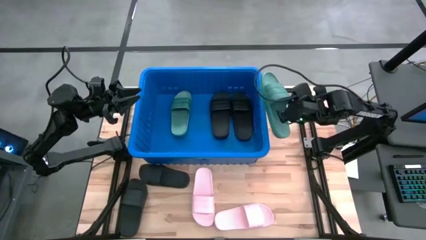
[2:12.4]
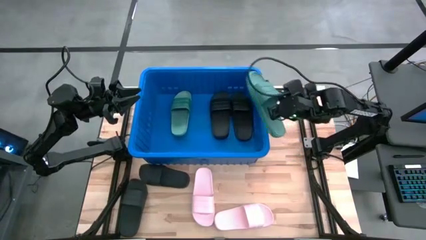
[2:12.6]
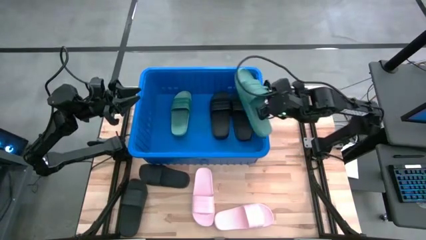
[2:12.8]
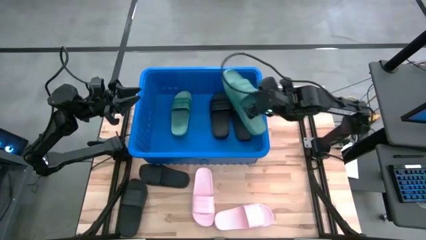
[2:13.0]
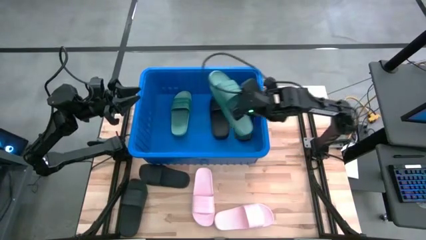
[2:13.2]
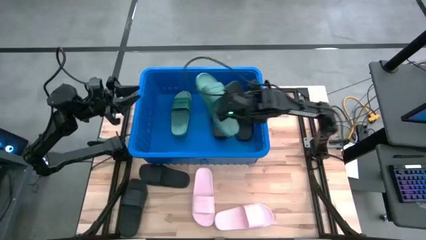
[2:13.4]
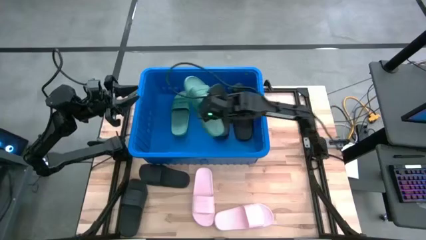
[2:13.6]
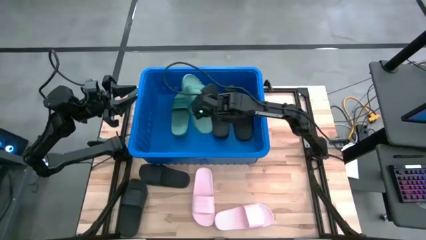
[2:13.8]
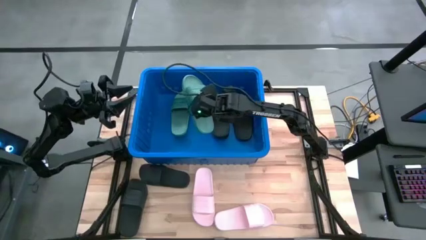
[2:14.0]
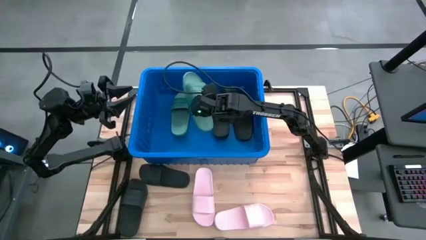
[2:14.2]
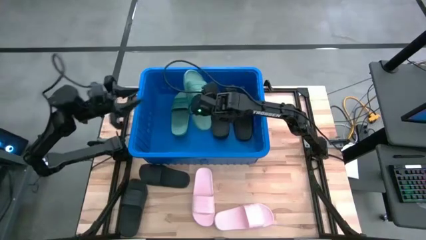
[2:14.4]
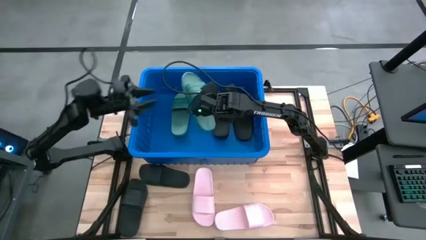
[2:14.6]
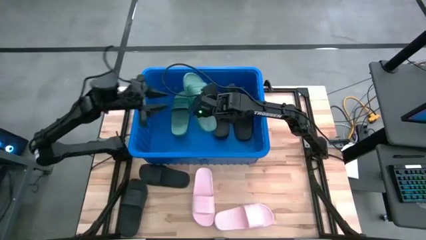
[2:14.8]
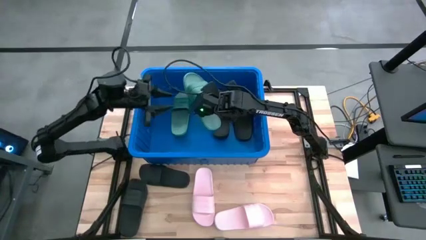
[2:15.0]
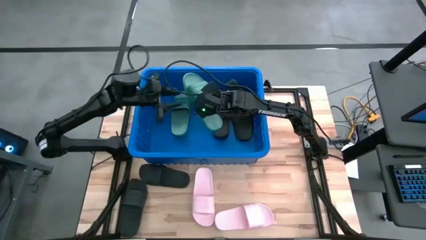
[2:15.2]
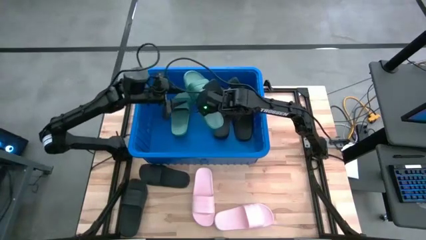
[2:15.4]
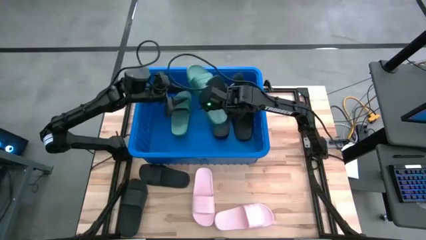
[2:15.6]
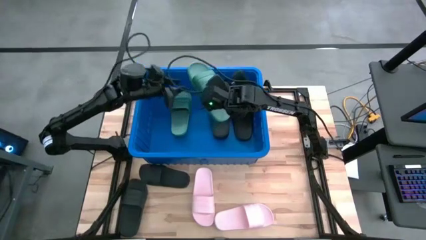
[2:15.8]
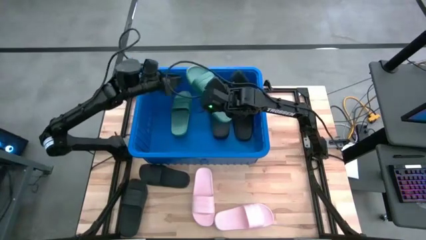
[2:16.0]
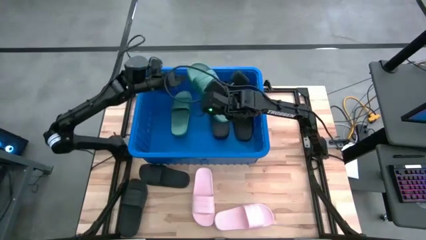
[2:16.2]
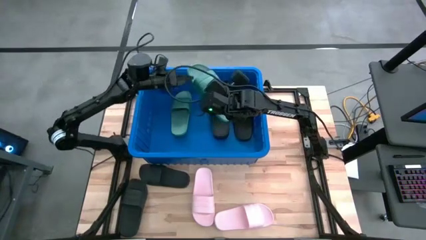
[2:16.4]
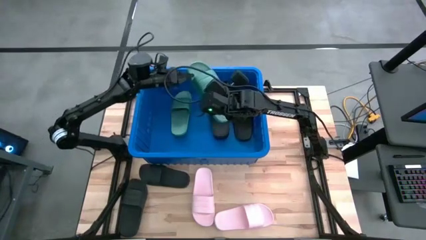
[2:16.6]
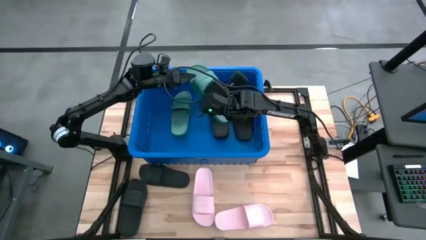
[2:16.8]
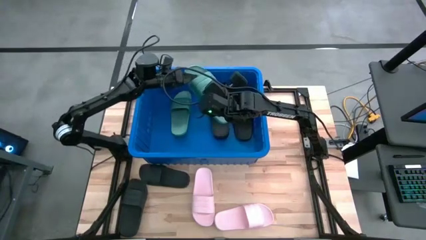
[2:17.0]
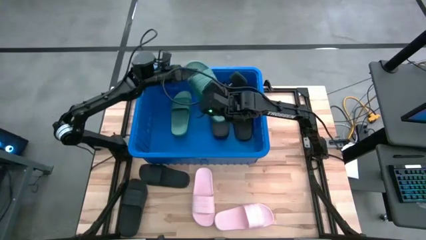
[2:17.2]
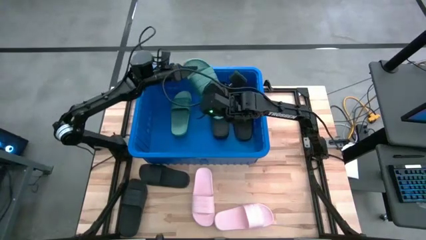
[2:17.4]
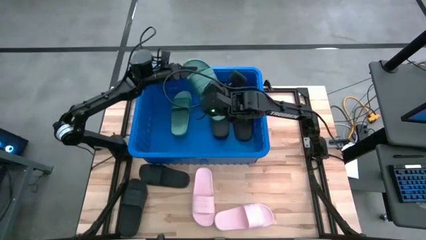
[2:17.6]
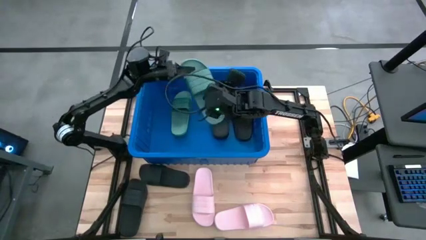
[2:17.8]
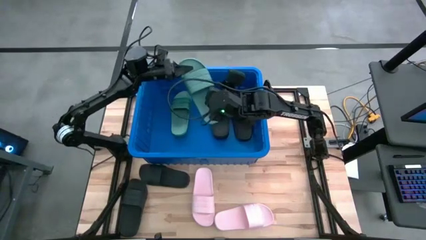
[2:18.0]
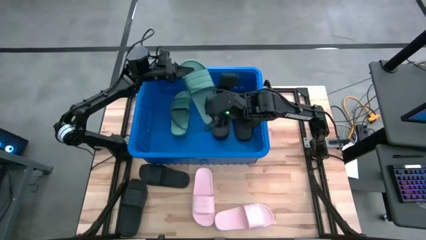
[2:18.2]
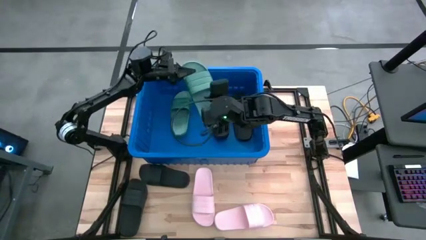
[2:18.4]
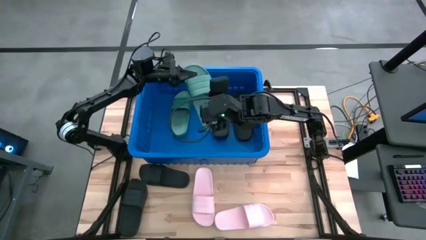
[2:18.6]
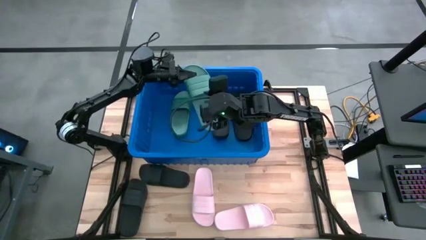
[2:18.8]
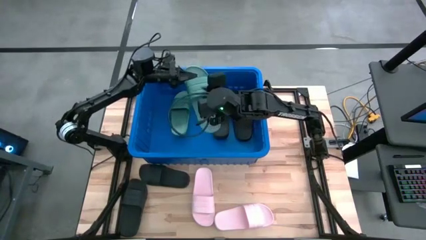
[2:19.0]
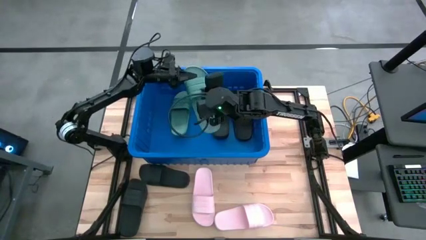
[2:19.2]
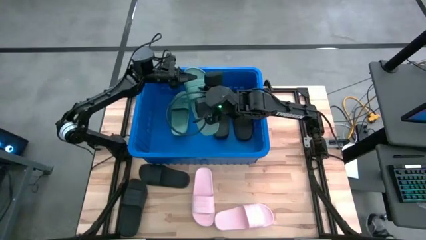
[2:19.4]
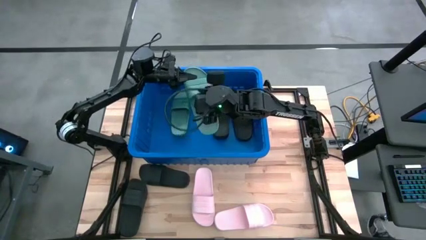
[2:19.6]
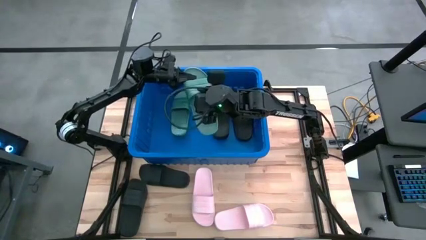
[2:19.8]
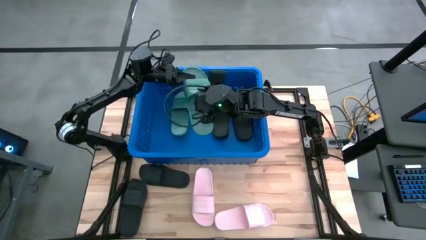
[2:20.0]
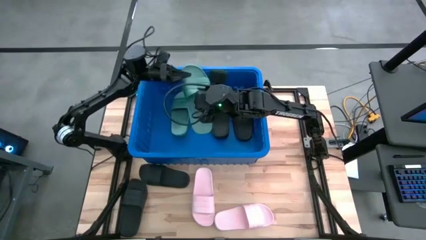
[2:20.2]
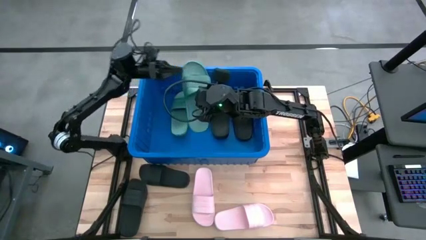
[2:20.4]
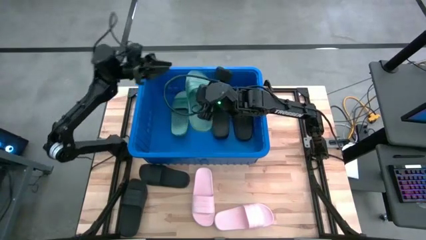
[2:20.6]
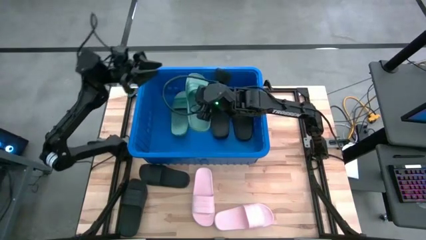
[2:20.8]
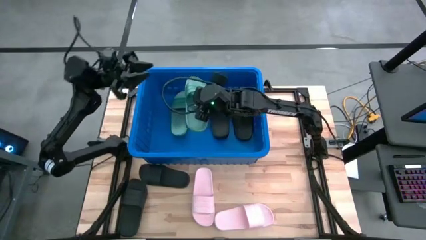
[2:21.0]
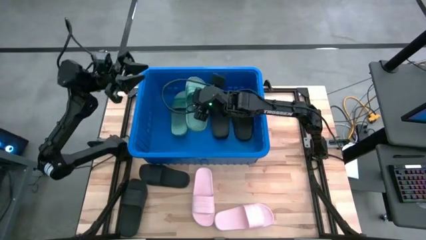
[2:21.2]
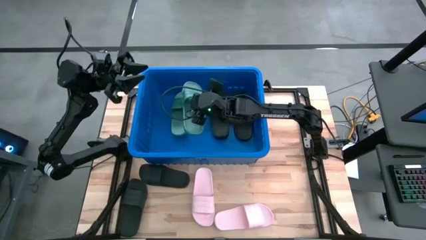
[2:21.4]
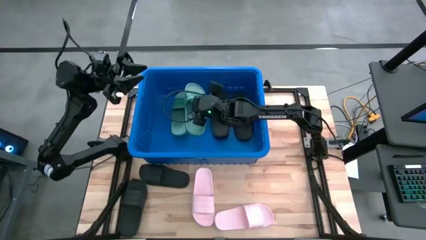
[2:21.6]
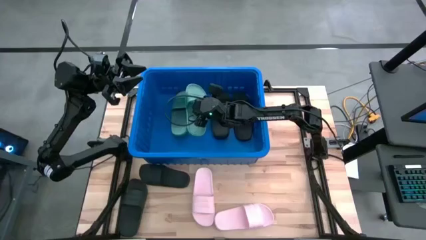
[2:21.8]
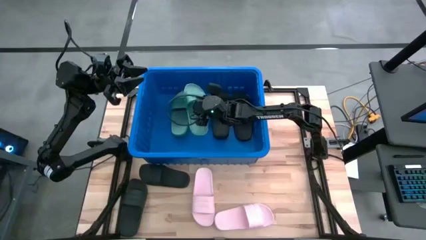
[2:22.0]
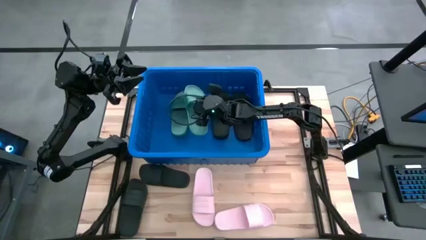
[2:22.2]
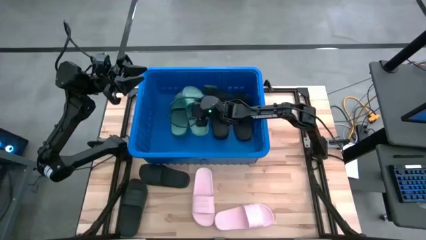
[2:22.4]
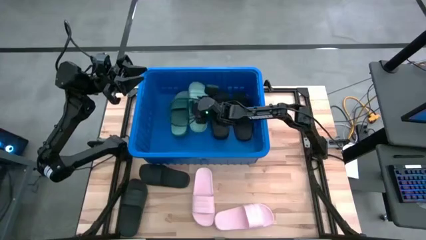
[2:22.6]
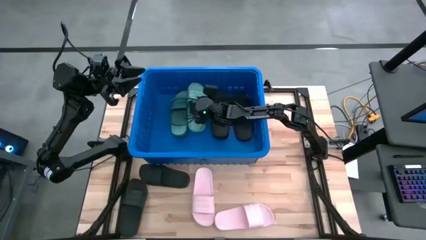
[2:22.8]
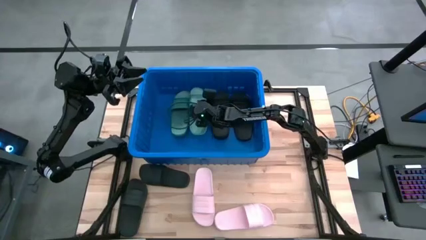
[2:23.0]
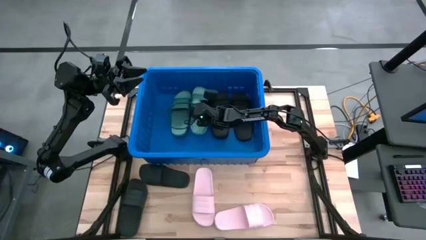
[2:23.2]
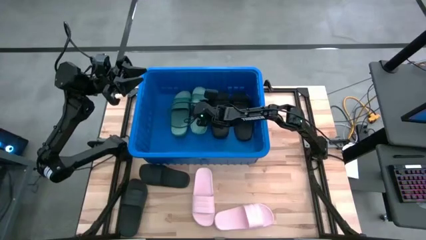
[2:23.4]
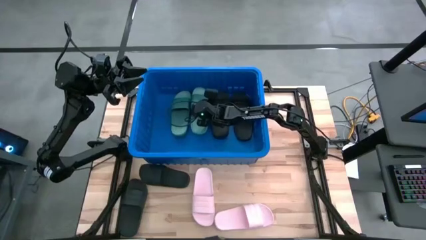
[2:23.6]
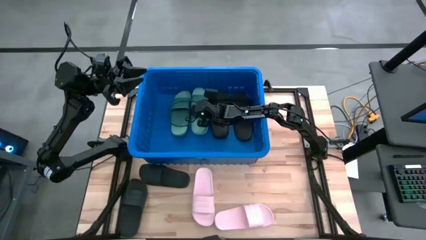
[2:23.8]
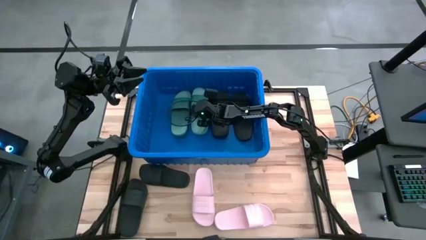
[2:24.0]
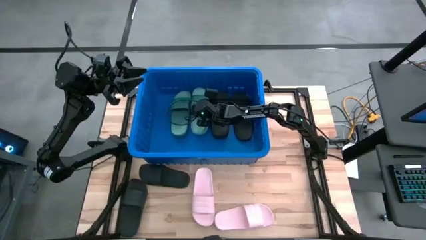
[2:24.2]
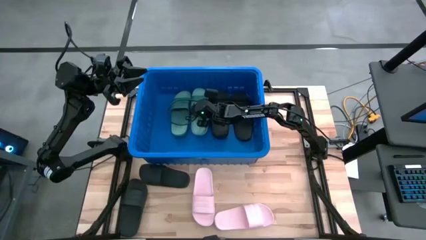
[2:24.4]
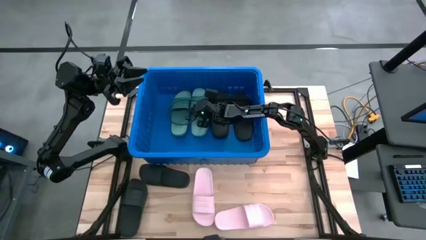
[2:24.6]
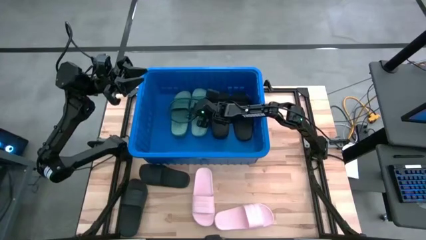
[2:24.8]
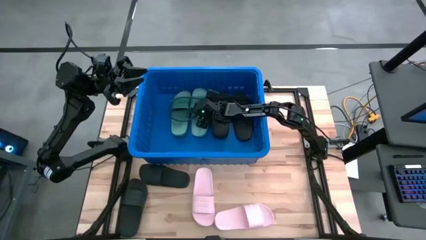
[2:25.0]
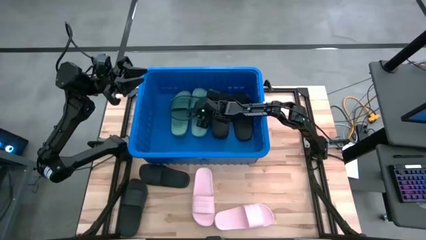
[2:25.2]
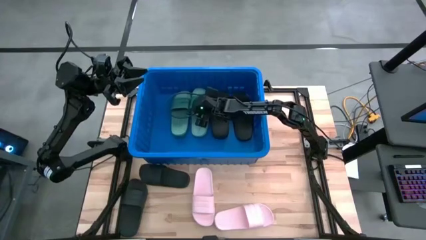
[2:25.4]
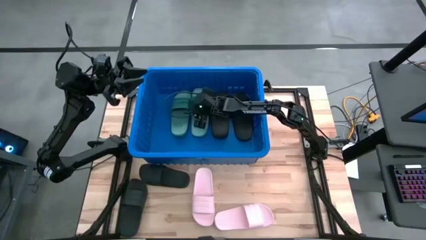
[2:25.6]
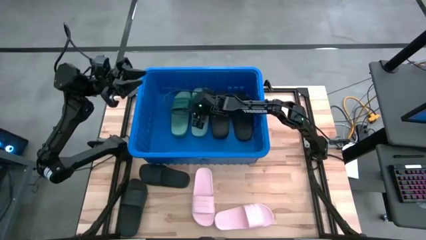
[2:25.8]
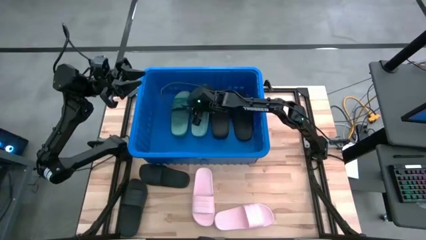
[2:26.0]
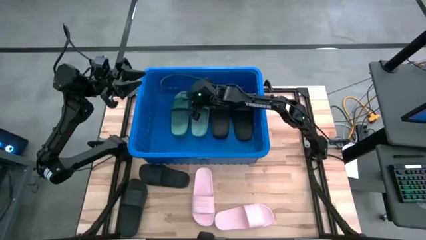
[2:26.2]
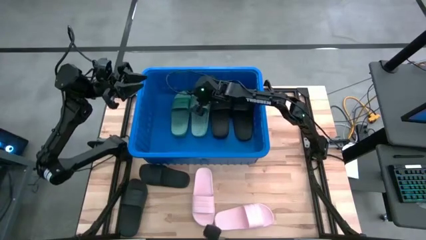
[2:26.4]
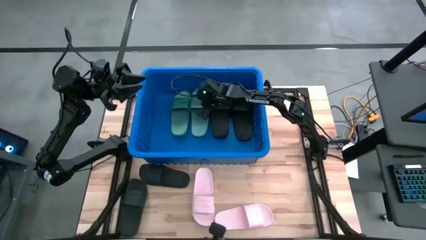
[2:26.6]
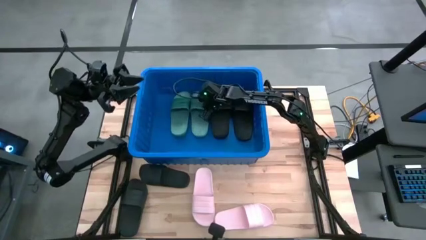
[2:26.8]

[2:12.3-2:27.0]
Task: Pick and place slides into bin
Put the green slide into the blue bin

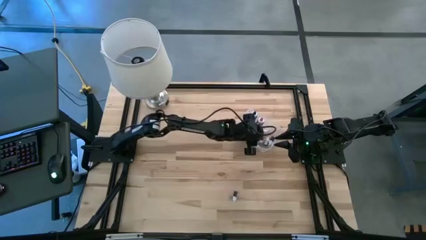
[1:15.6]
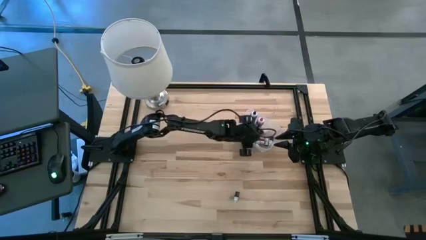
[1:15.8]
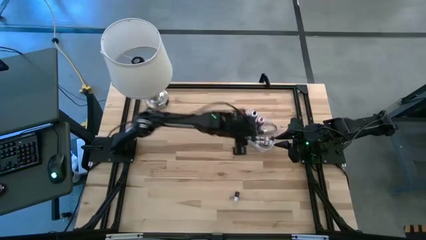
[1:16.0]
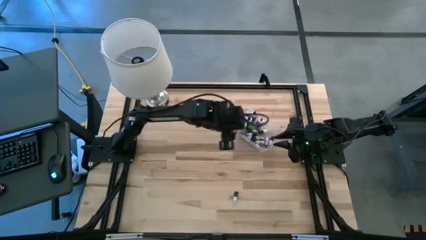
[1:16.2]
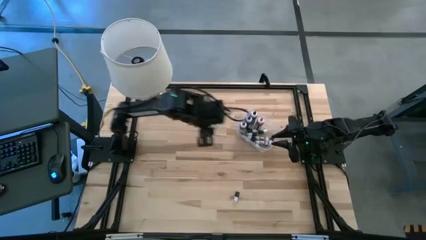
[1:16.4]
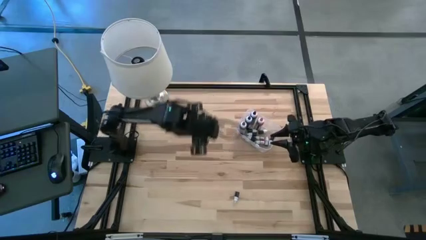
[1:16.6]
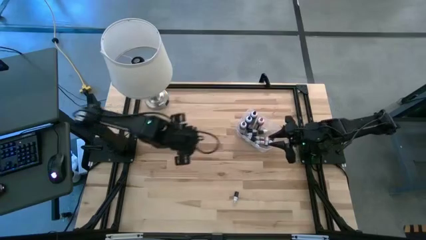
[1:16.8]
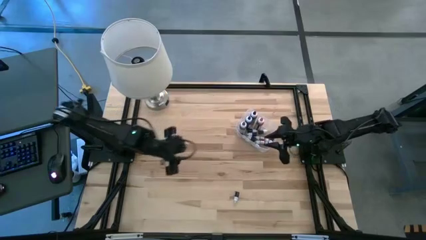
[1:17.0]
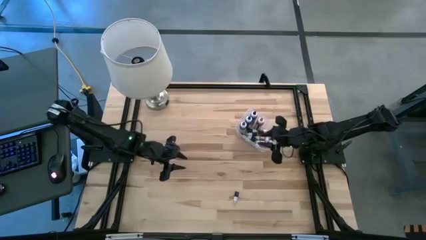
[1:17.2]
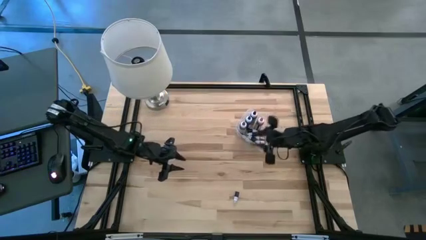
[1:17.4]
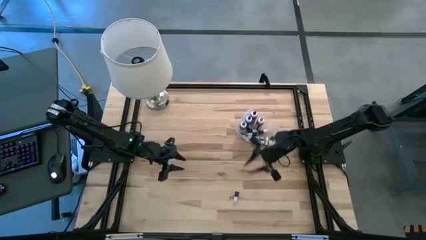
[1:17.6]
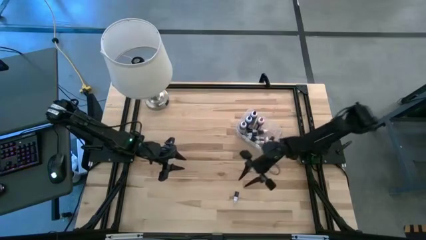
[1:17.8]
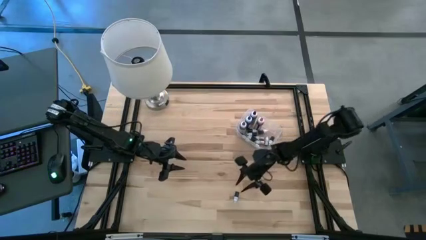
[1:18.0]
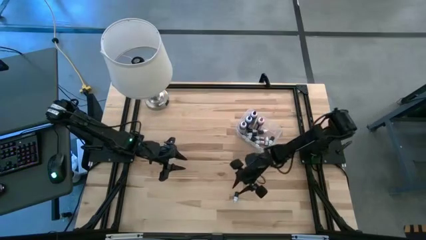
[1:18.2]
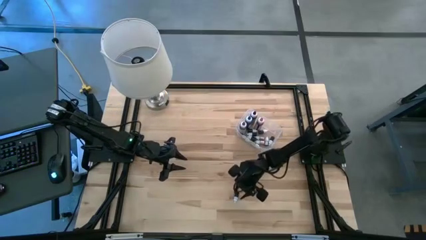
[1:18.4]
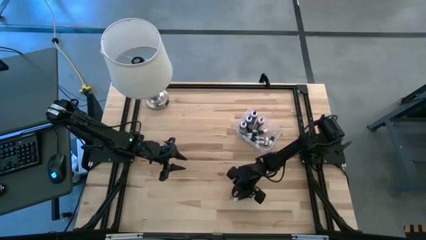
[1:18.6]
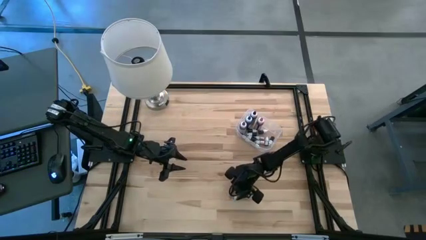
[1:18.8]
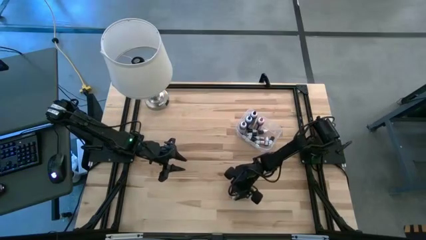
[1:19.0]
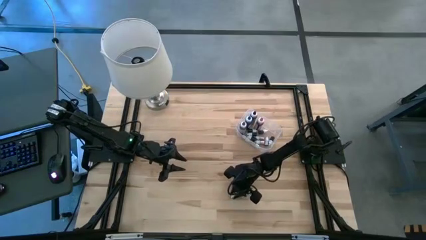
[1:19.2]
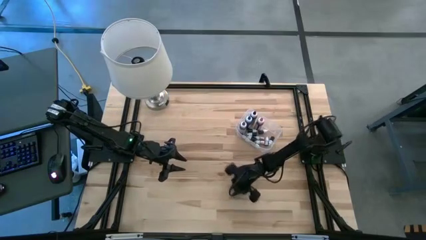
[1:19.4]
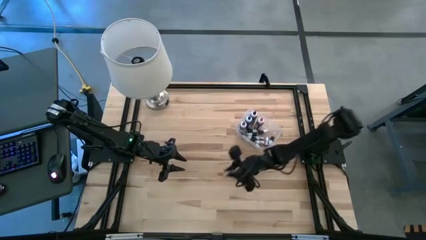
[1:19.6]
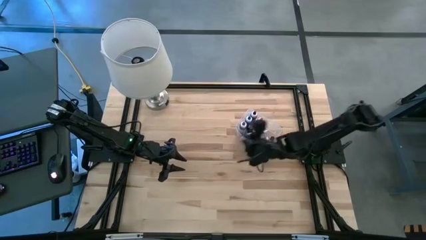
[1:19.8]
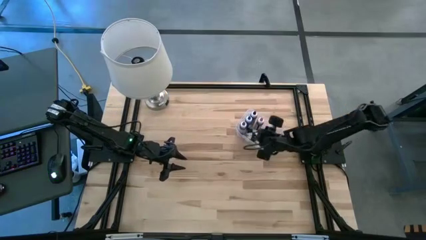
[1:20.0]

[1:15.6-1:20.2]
Task: Pick & Place food coloring
Put the small brown food coloring bottle into the transparent bin
